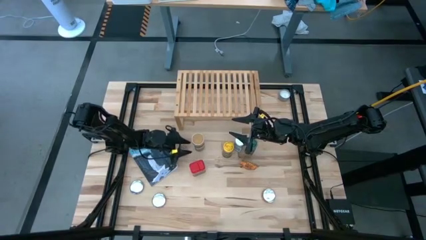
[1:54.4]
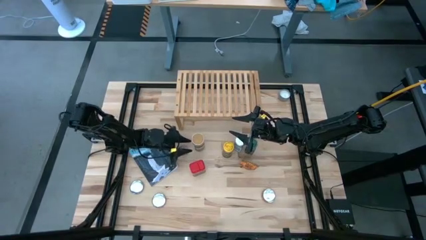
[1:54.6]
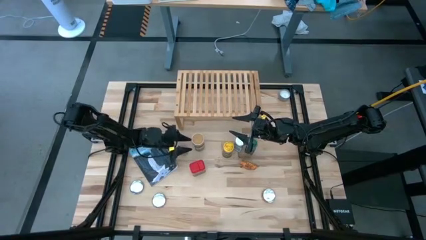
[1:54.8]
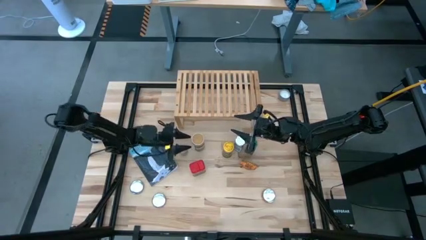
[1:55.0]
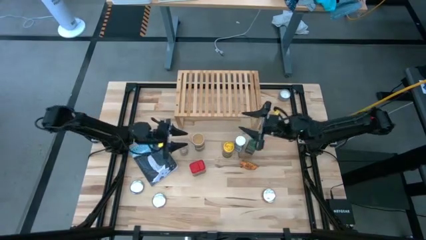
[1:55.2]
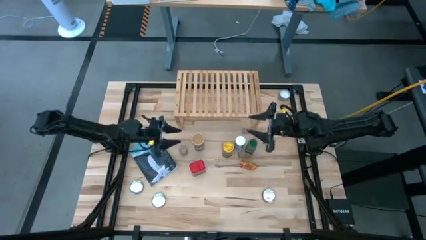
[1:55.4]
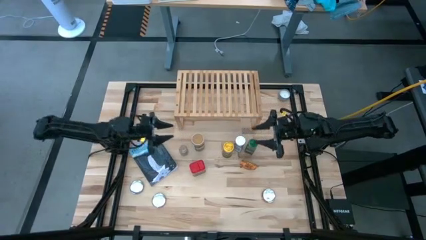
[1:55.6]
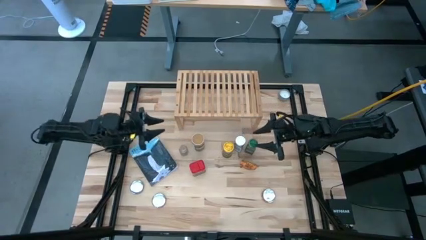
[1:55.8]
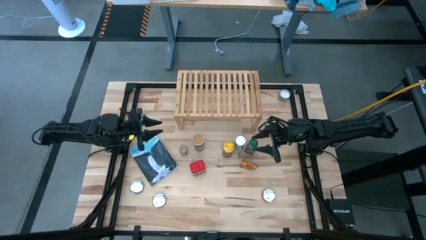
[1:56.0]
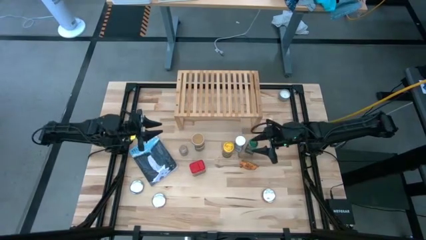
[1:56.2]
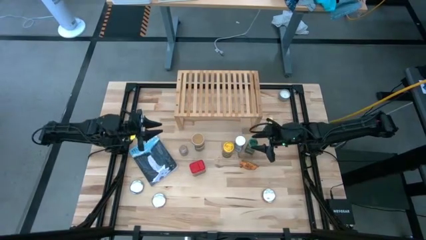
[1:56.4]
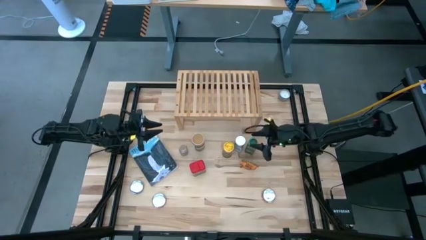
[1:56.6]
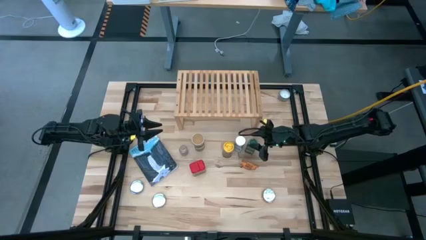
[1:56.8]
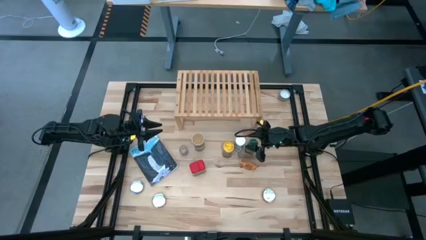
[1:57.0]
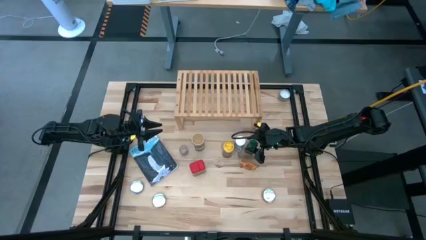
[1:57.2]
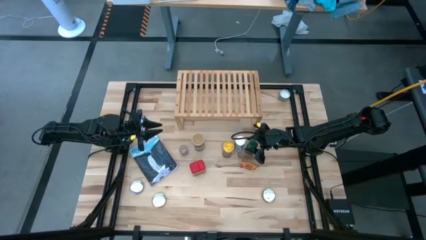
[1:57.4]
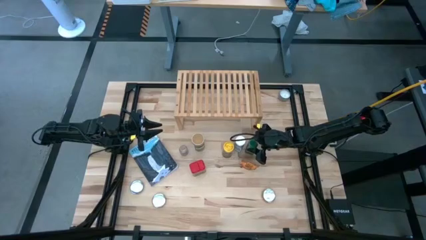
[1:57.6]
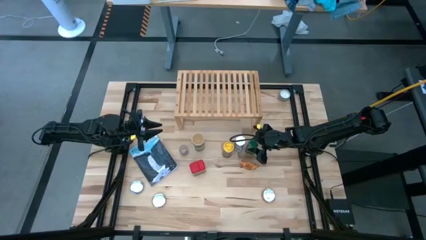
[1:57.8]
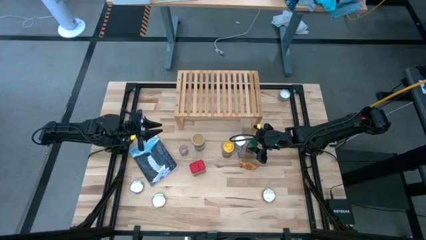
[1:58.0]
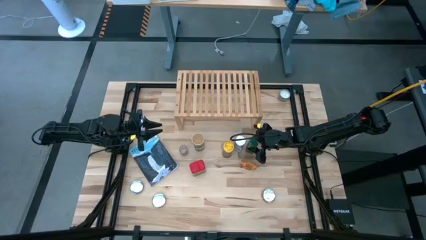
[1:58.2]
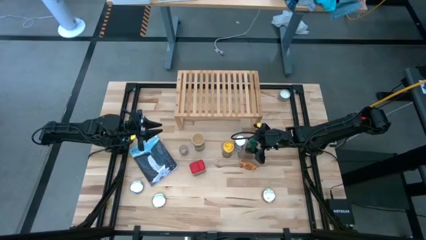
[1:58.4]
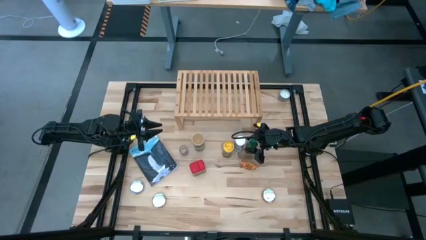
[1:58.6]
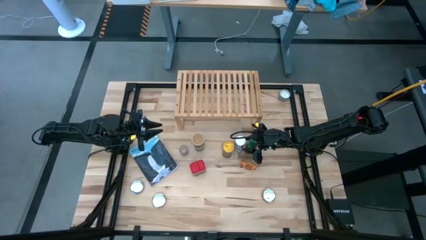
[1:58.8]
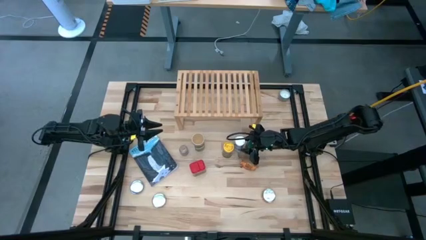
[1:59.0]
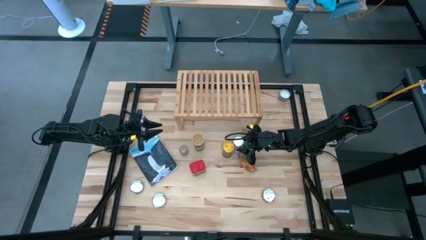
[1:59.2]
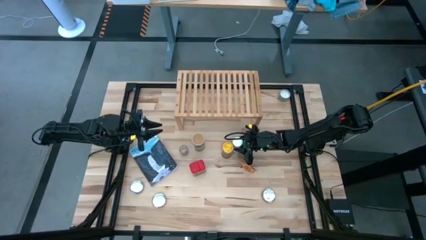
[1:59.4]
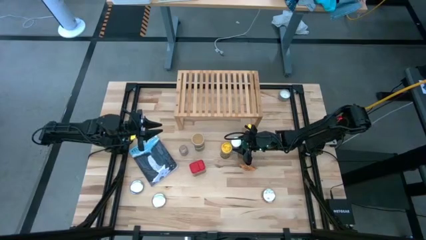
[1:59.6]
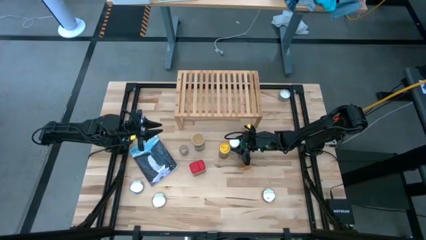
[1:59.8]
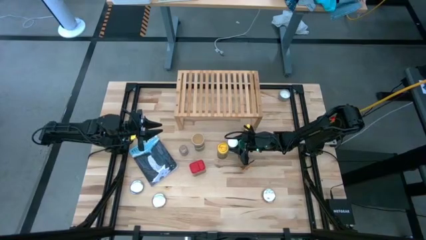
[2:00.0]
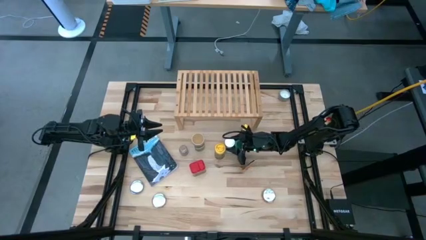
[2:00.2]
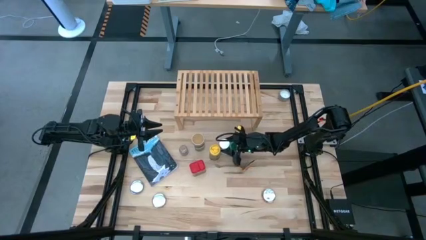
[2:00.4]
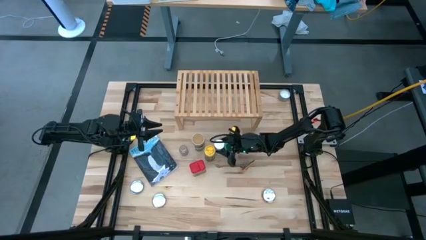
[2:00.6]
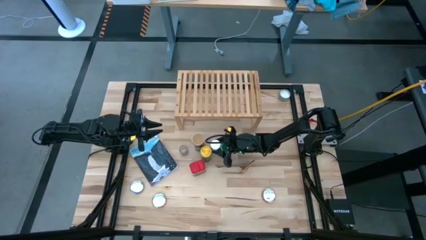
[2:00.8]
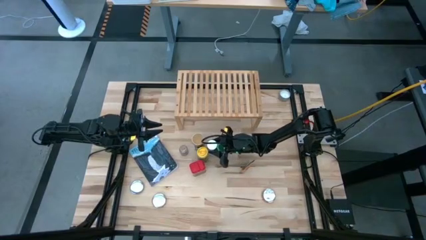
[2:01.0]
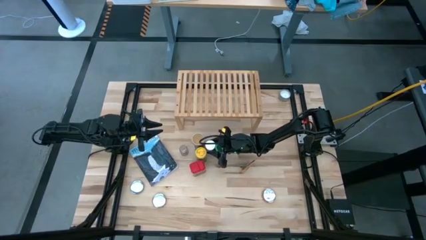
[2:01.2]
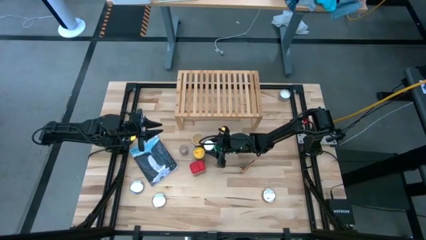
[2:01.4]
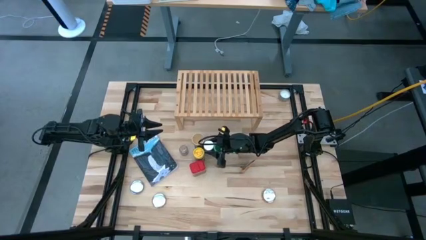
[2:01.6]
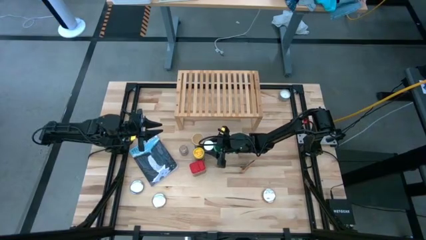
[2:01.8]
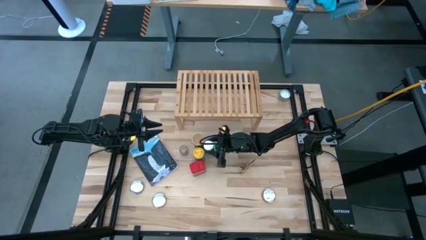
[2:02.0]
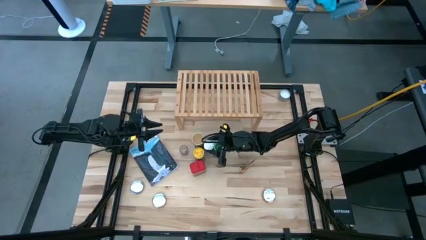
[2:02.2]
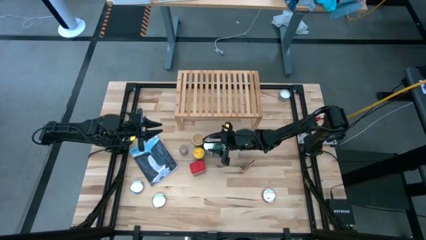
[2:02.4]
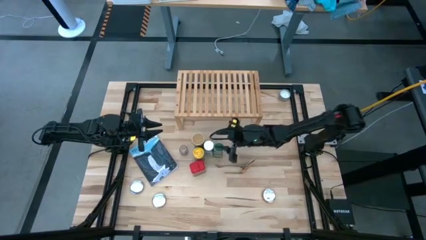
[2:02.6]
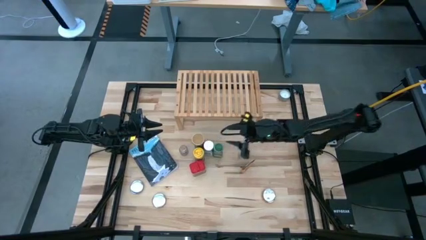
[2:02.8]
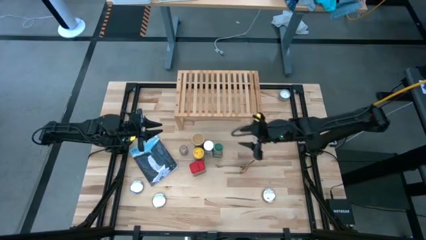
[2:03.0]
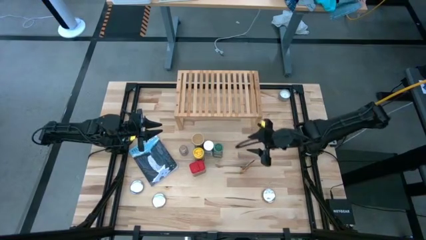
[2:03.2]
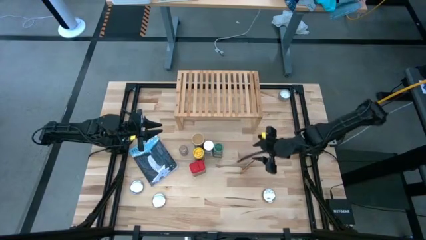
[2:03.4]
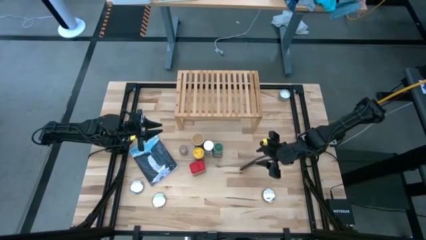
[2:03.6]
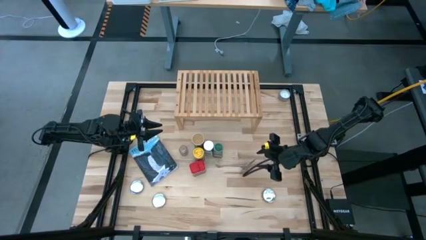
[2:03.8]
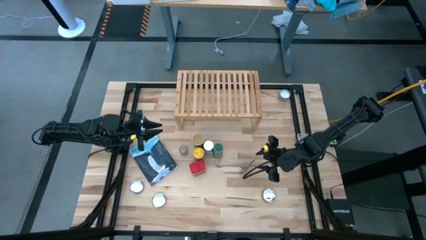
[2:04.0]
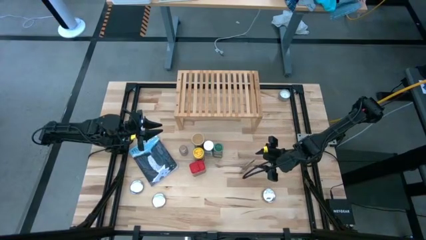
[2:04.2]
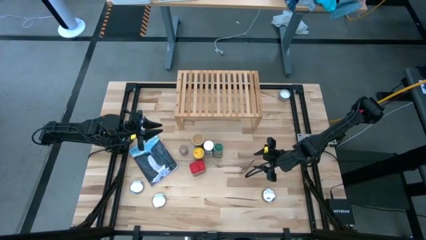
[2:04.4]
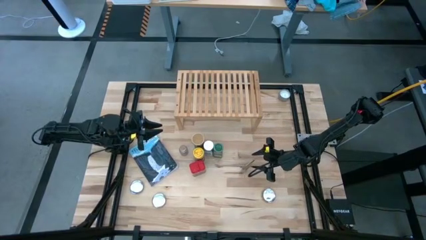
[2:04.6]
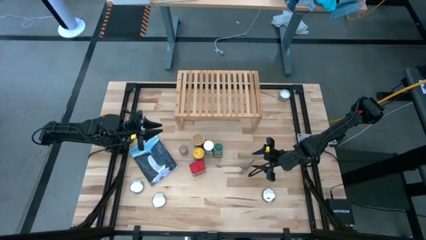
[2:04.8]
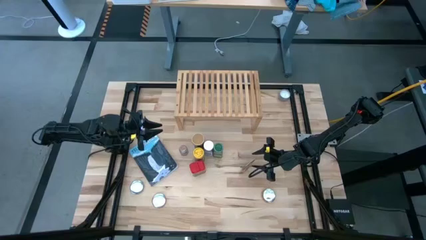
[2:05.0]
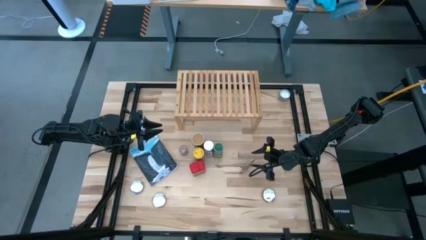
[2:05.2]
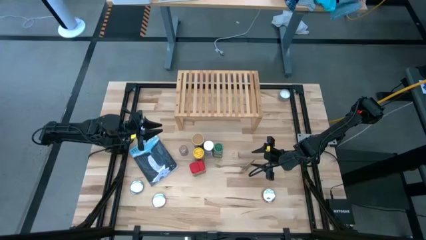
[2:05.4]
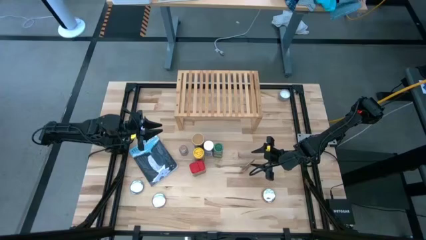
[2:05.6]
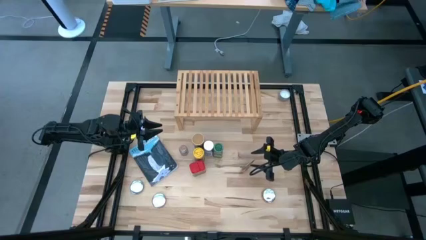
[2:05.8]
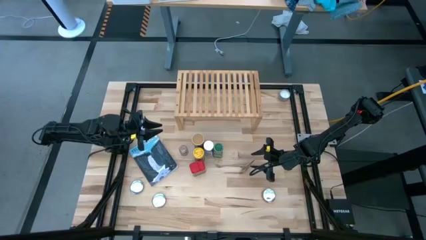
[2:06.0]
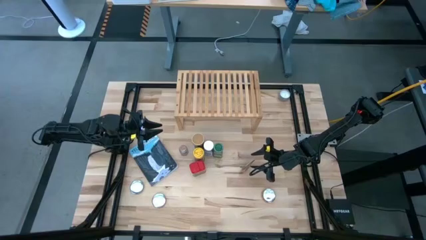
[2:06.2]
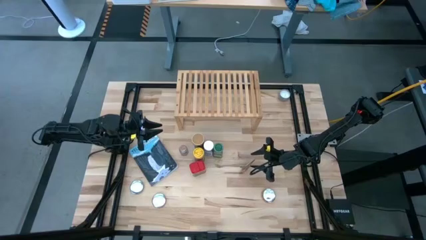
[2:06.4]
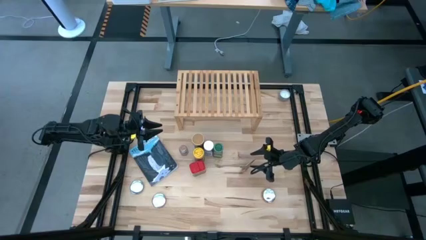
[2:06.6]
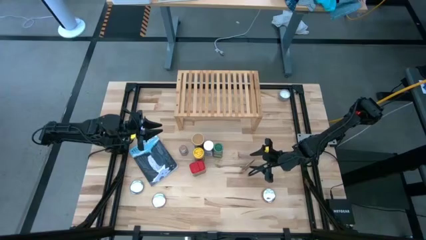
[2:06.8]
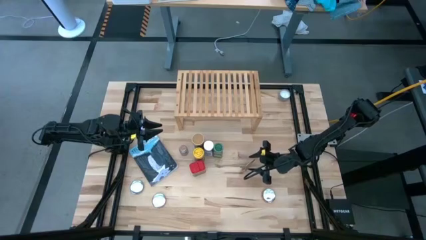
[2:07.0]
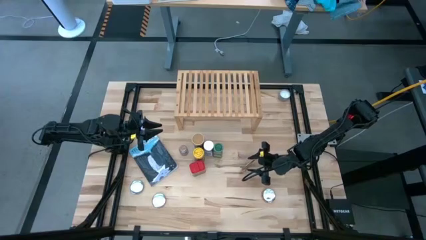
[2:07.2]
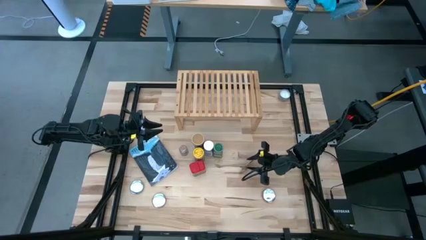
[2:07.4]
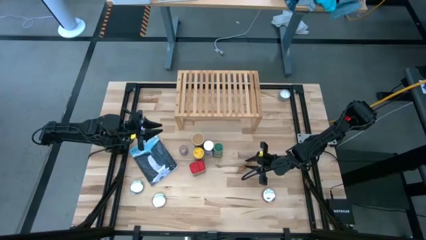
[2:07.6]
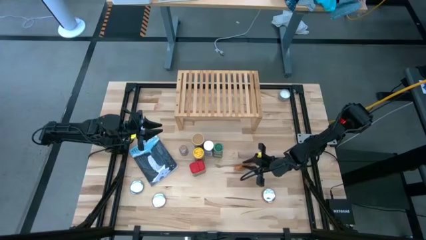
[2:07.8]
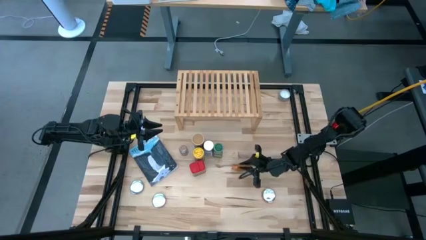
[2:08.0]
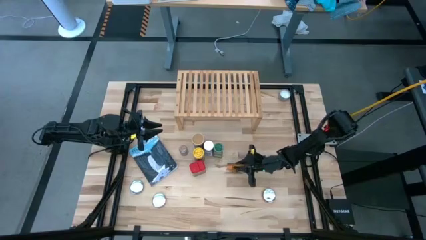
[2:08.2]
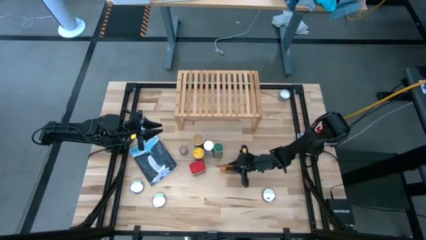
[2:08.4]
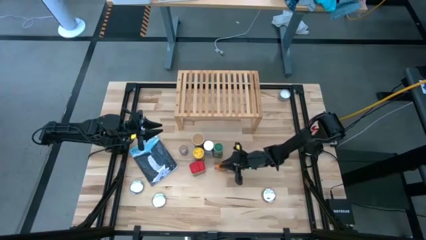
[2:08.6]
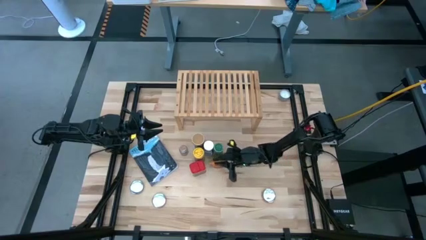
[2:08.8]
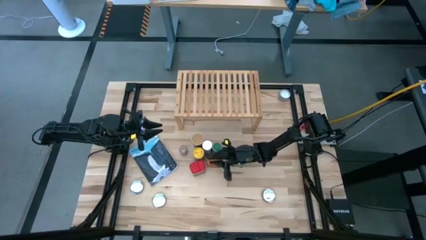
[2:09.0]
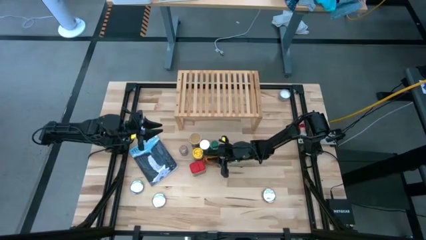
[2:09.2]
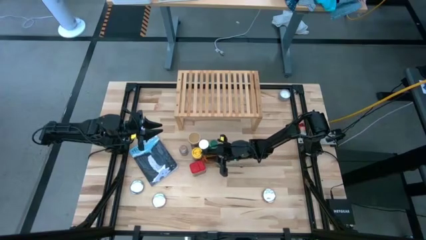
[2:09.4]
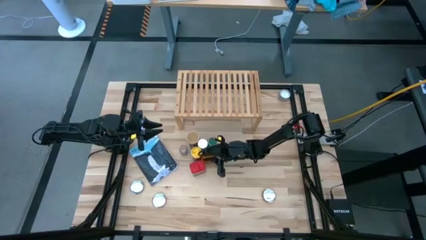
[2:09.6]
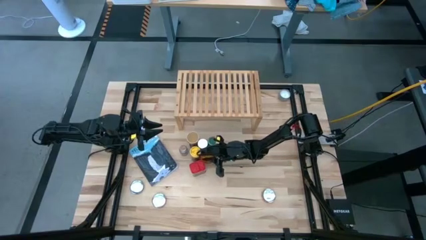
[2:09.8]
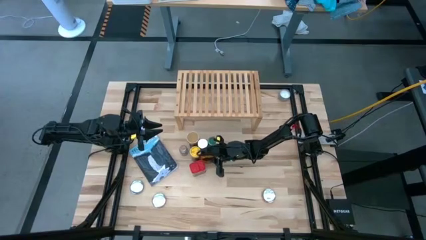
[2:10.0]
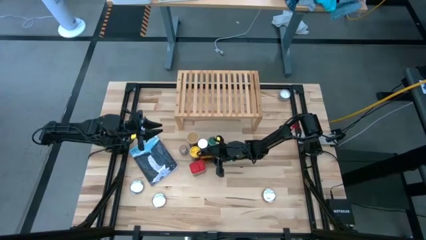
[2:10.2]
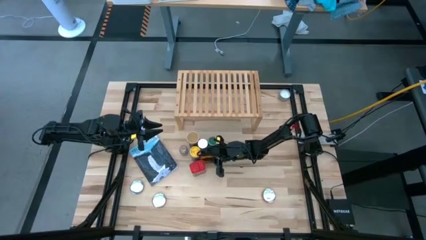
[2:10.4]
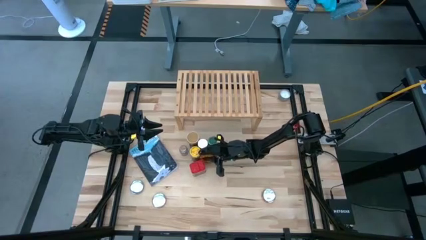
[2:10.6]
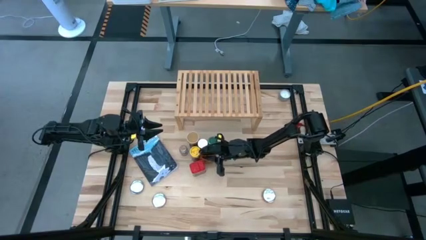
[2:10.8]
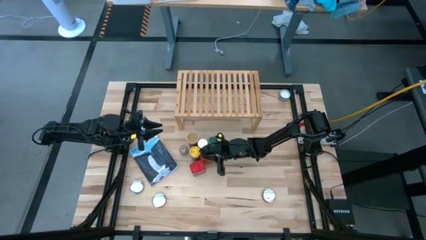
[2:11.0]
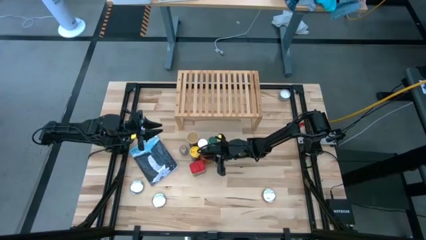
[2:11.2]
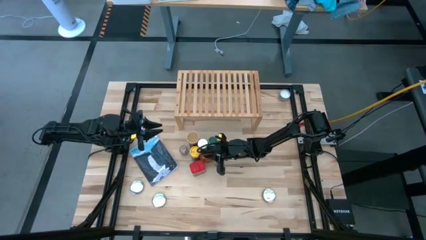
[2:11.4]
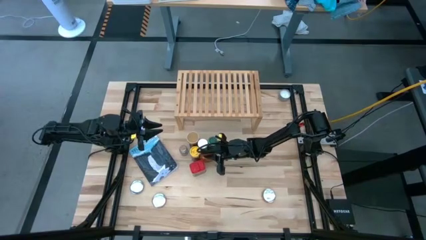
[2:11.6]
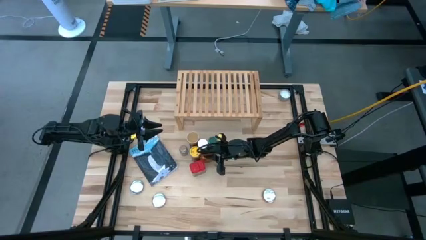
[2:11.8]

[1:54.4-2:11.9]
Task: Shelf spices
Adjust the seasoning bag and bottles
